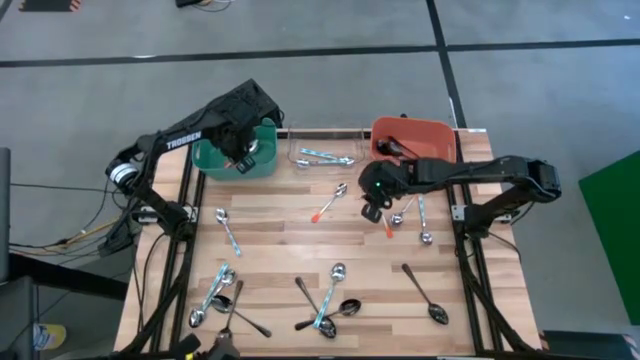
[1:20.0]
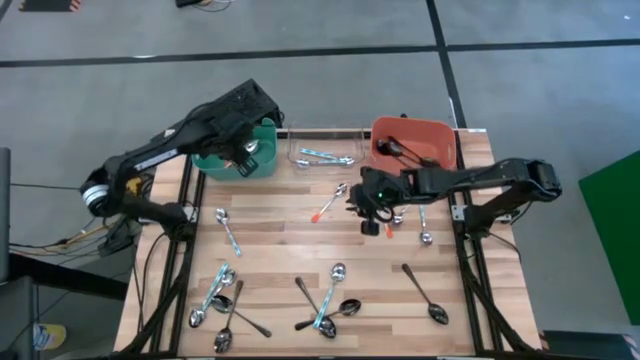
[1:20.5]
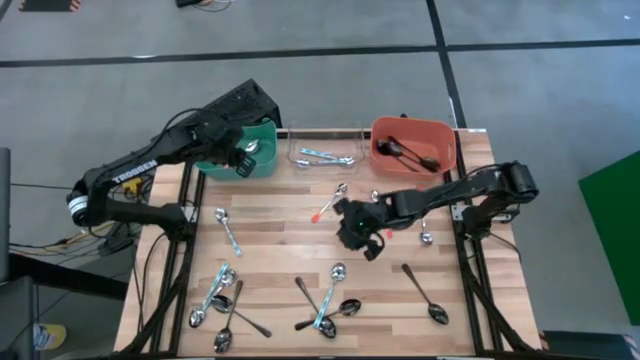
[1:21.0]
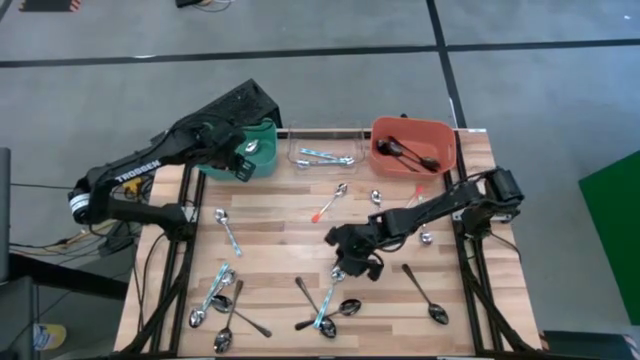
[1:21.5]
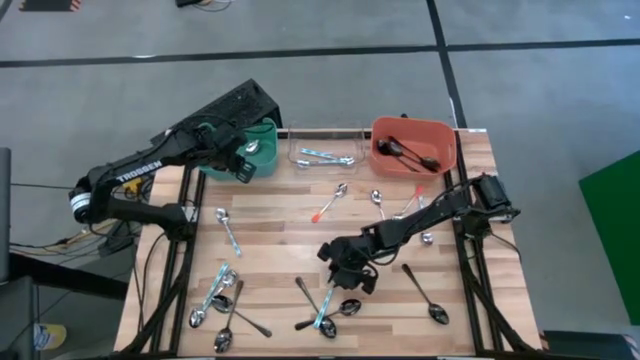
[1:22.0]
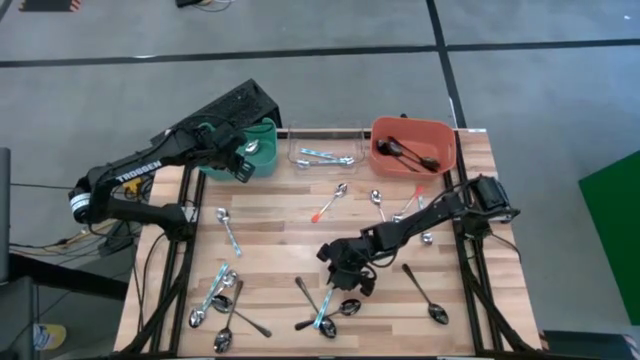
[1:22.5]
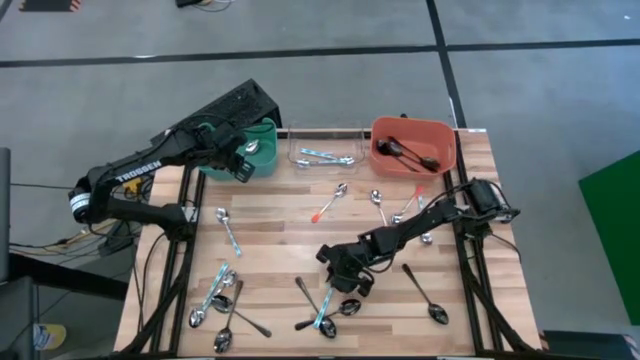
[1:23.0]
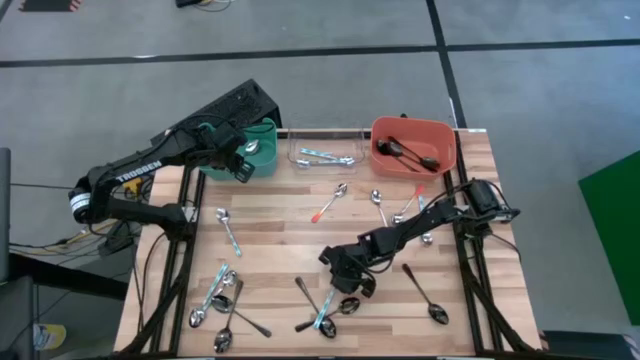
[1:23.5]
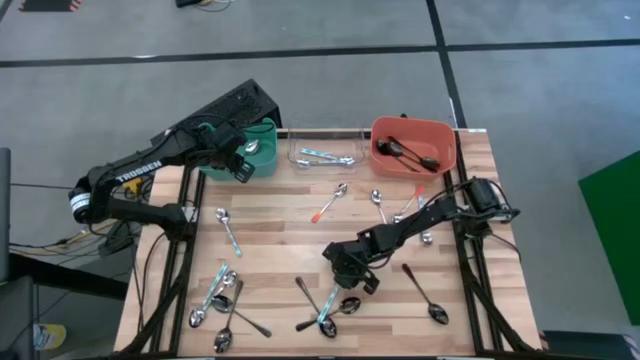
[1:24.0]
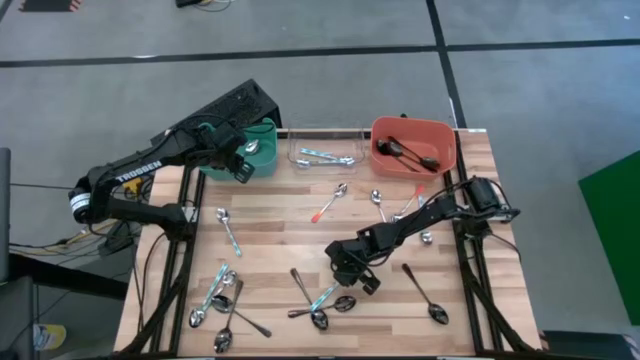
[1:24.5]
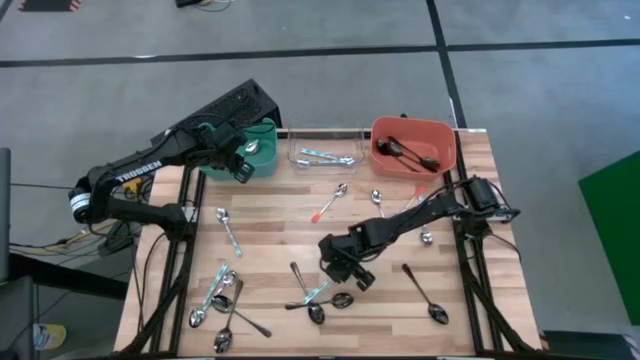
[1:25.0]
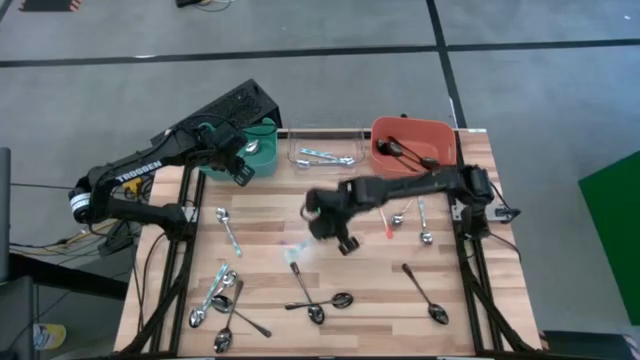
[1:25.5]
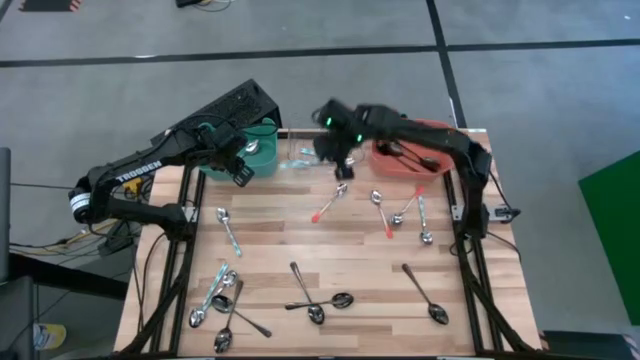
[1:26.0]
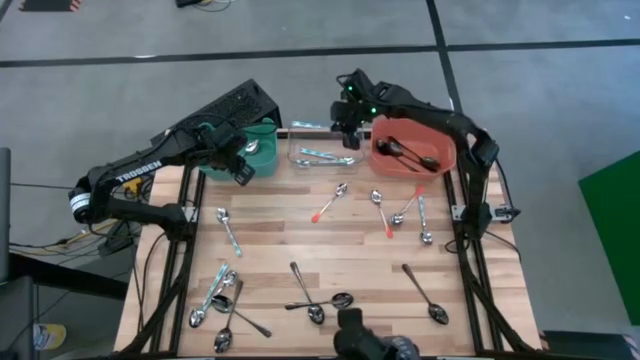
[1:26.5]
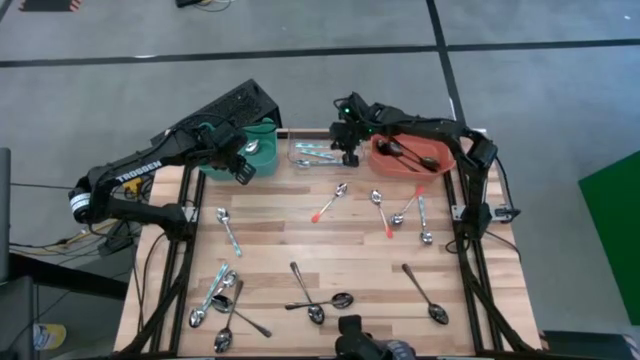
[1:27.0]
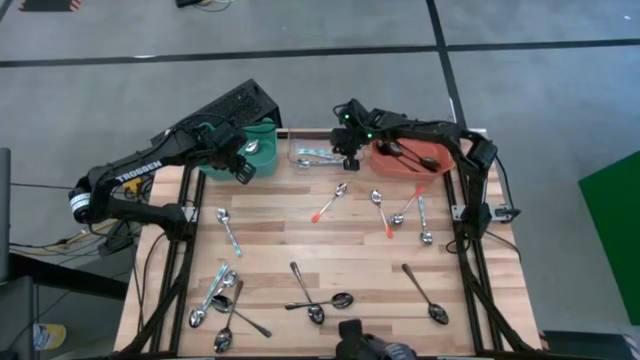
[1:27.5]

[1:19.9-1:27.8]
Task: Sort silverware by color (type)
Put the blue spoon into the transparent bin

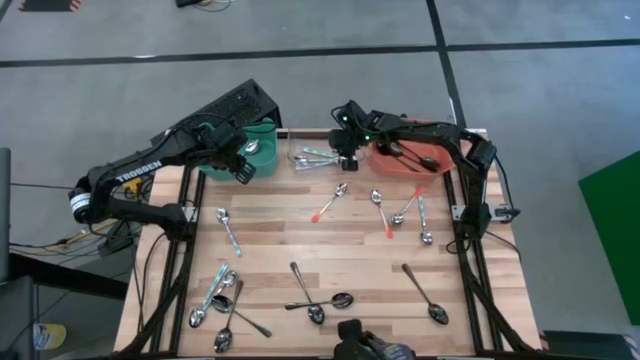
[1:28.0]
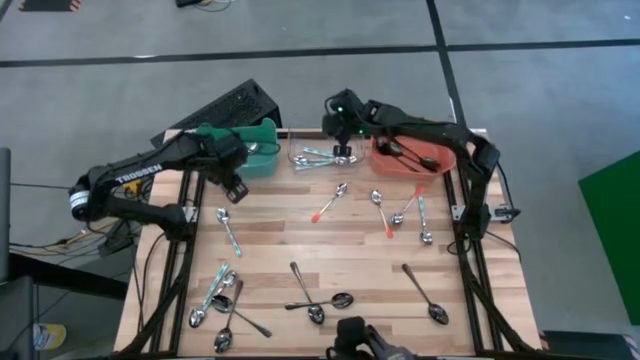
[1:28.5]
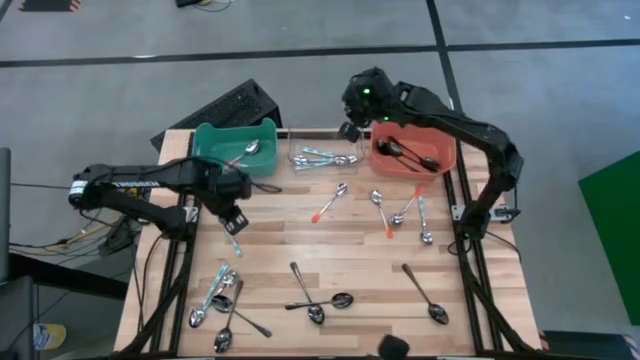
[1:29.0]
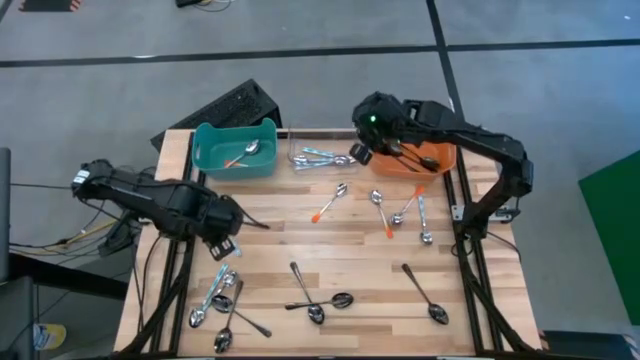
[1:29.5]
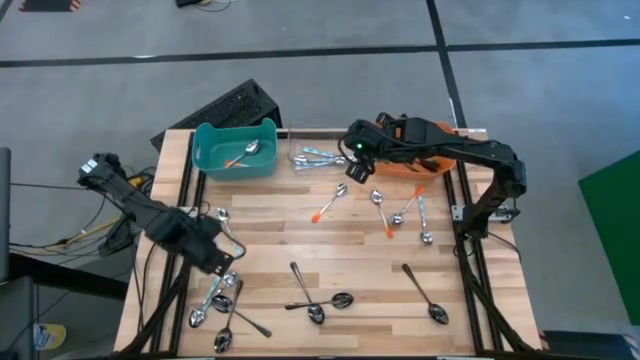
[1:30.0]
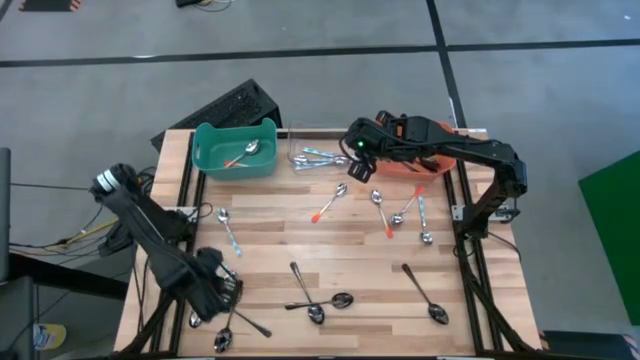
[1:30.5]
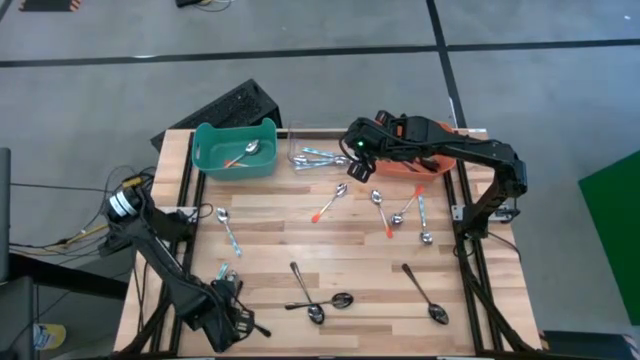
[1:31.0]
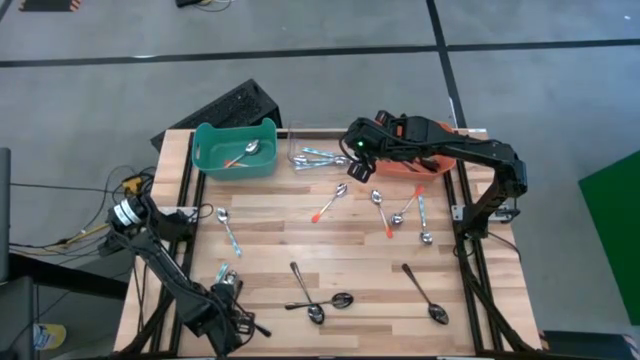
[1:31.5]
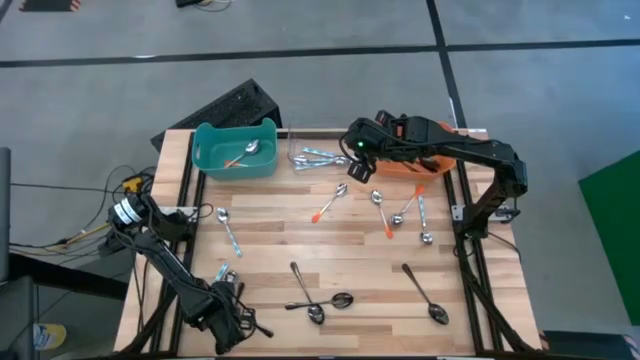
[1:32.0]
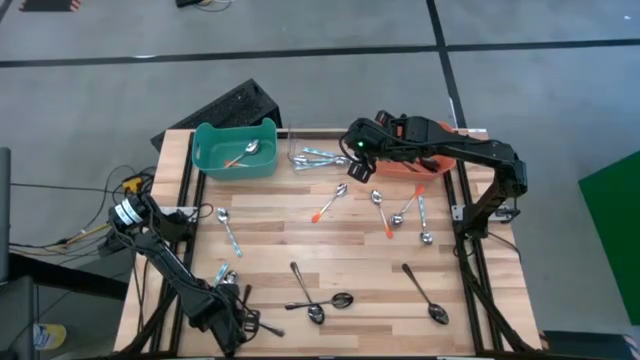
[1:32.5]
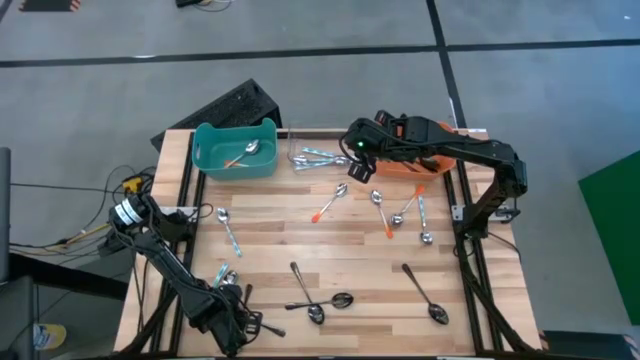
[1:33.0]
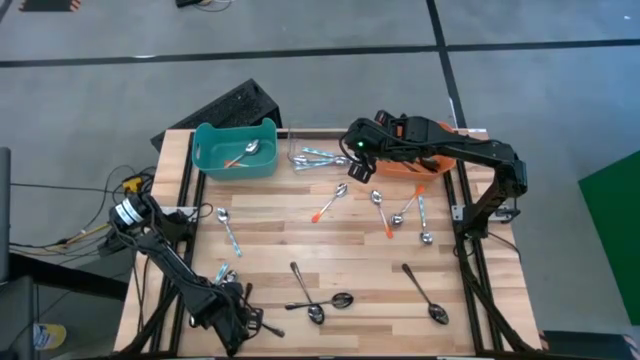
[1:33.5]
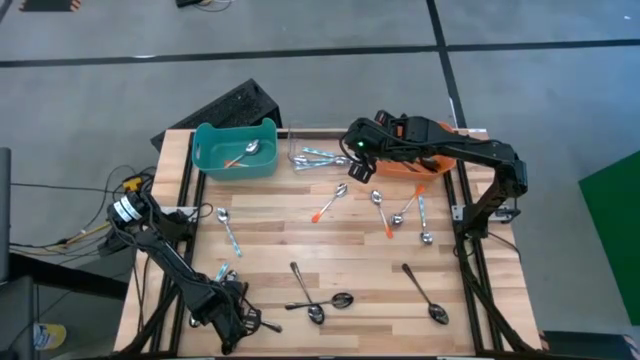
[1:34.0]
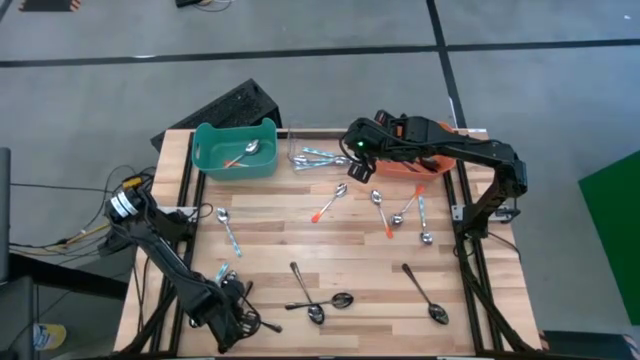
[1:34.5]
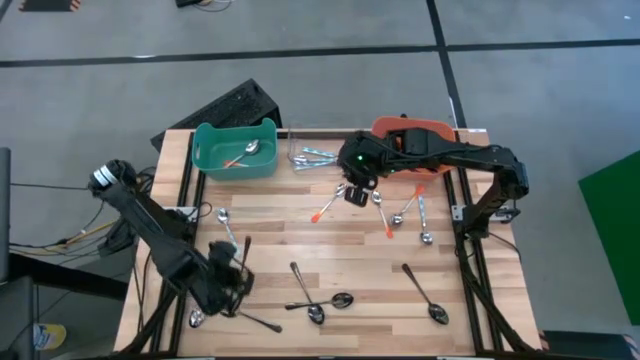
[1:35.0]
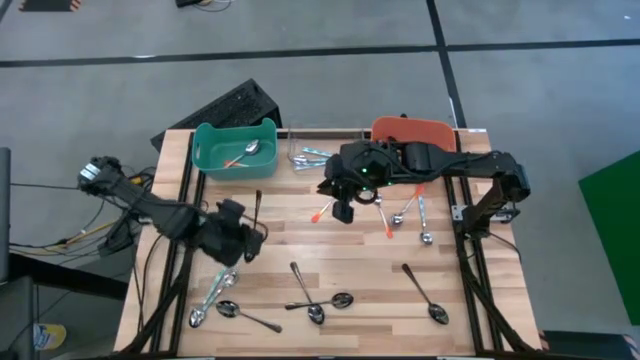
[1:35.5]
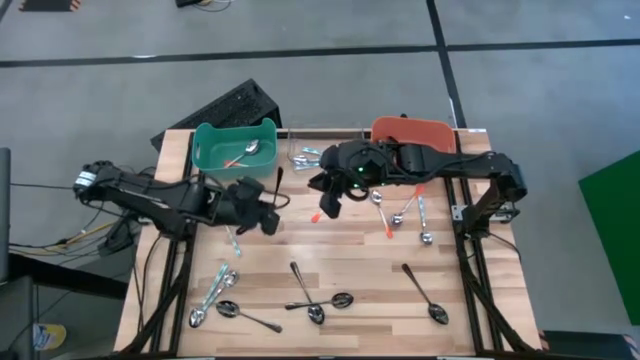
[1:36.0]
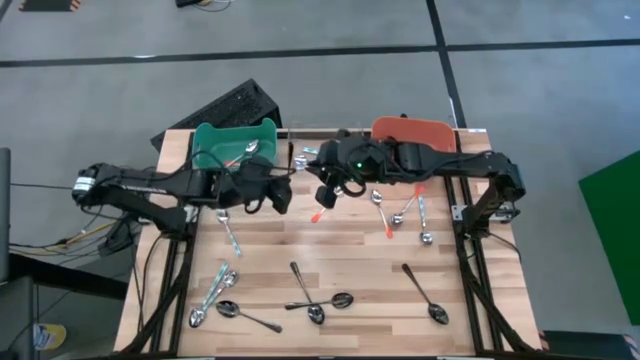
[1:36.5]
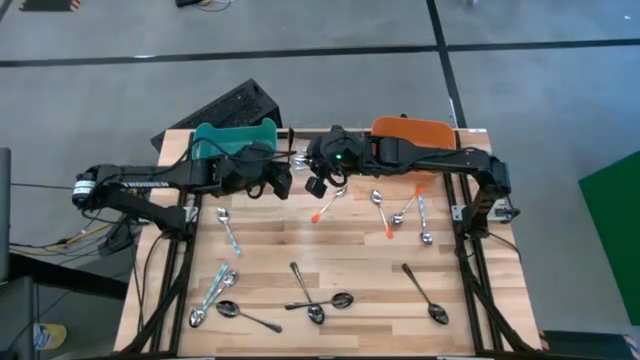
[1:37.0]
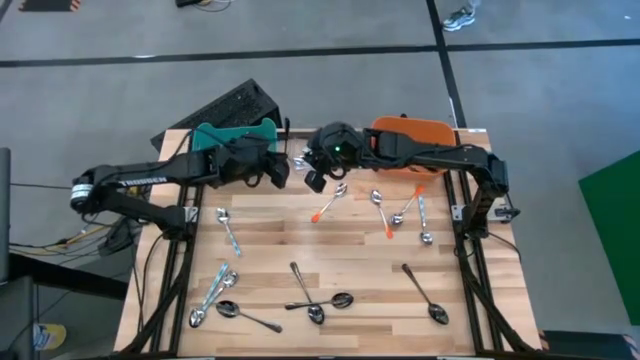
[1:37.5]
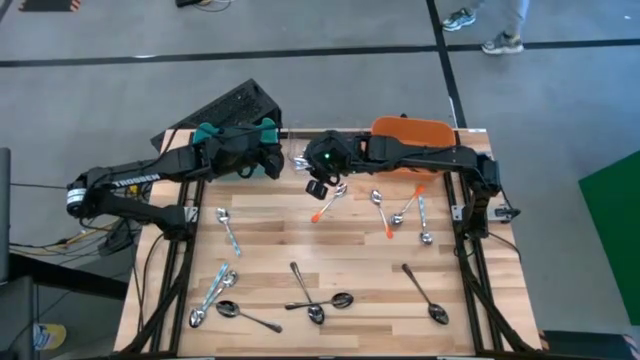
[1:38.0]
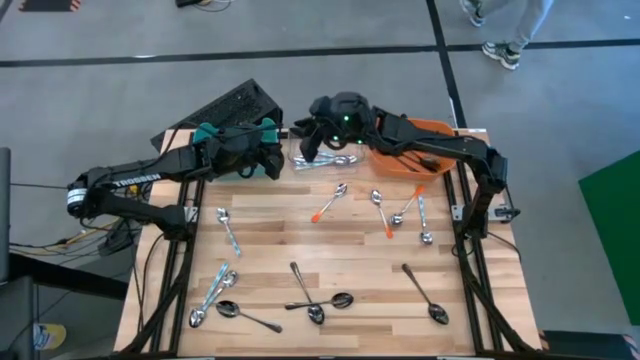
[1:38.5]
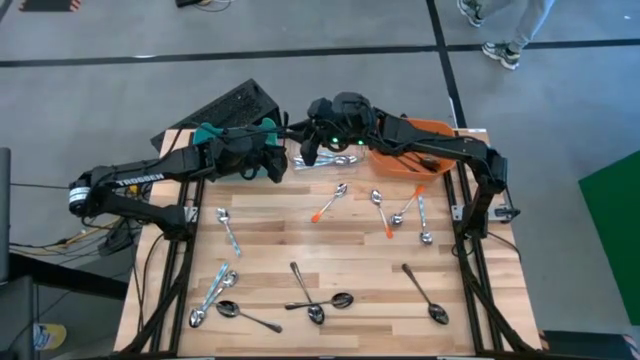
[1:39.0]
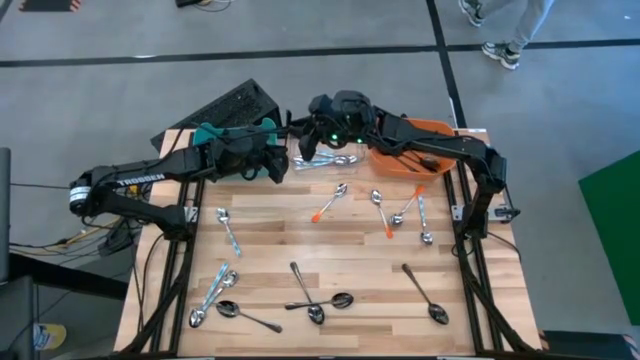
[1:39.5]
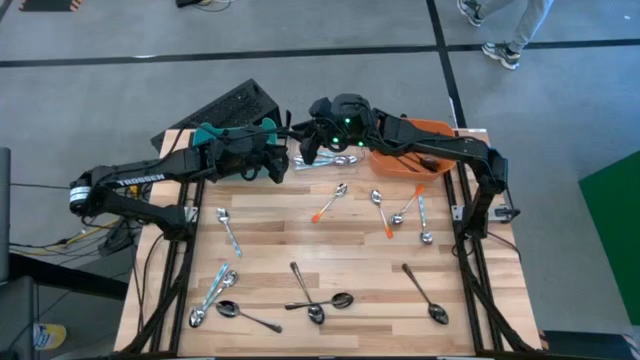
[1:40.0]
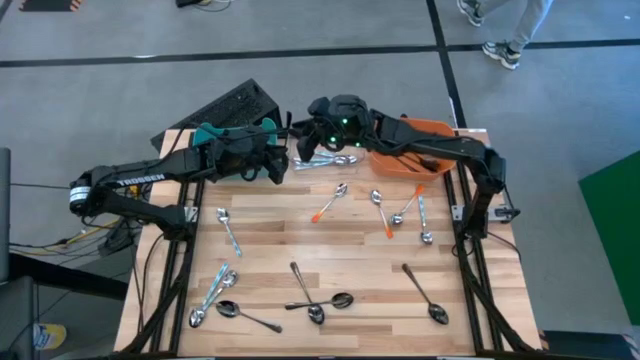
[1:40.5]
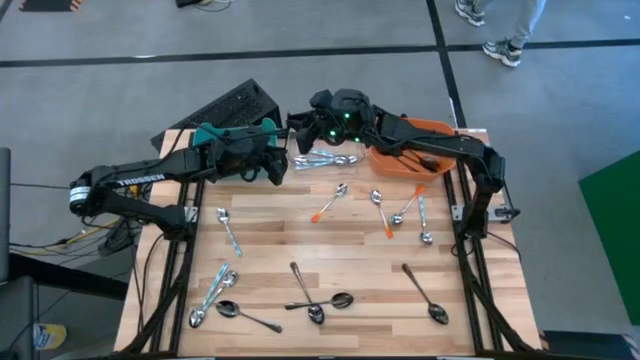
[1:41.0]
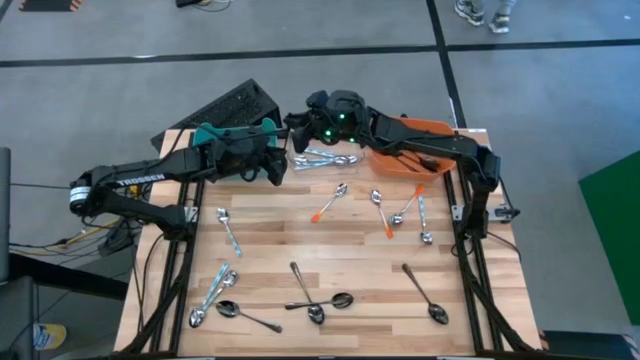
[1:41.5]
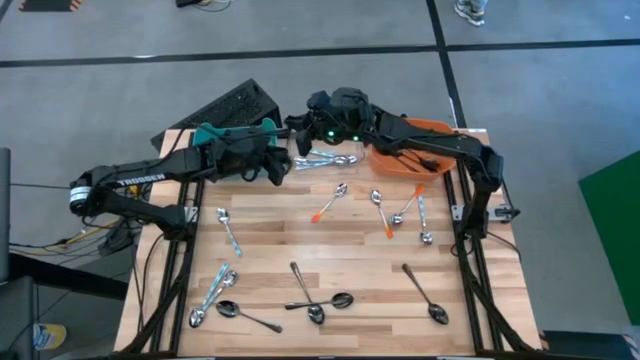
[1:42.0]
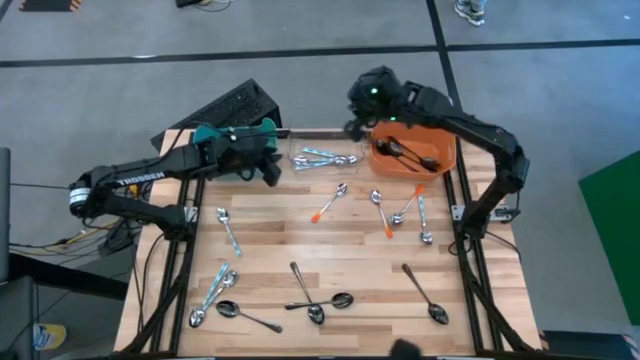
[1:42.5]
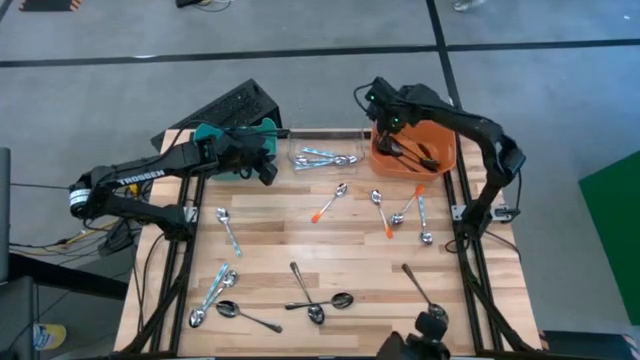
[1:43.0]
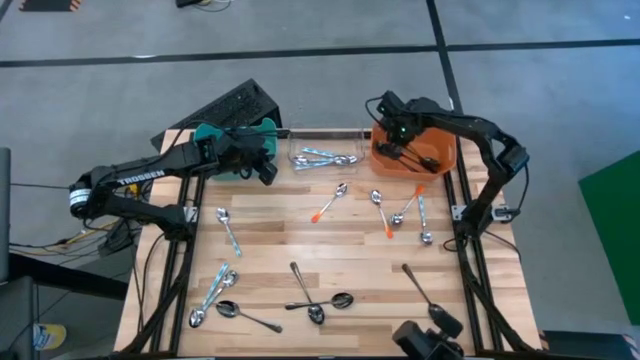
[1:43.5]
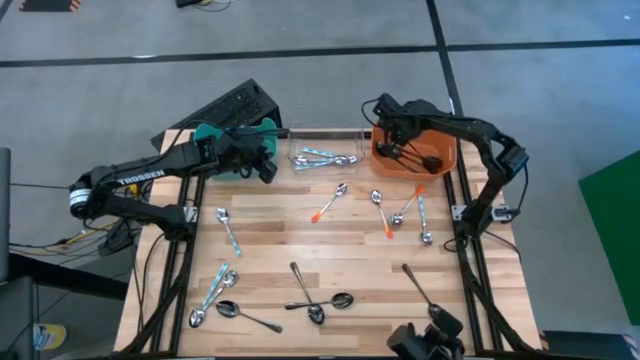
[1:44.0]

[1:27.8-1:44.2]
Put the black spoon into the orange bin
